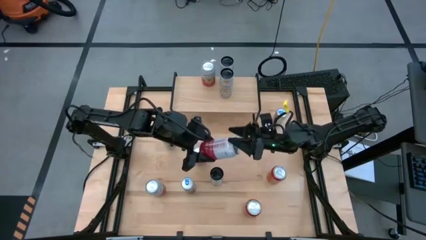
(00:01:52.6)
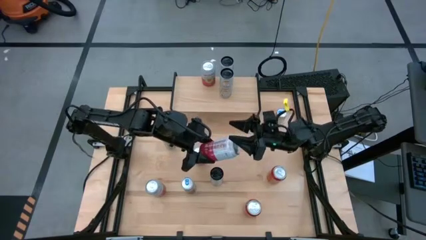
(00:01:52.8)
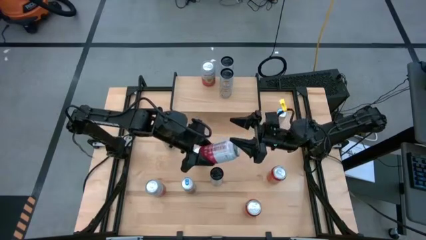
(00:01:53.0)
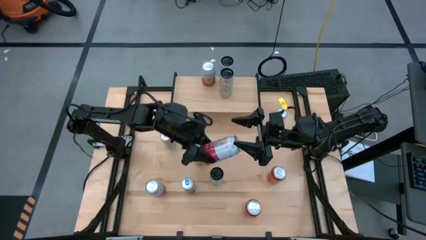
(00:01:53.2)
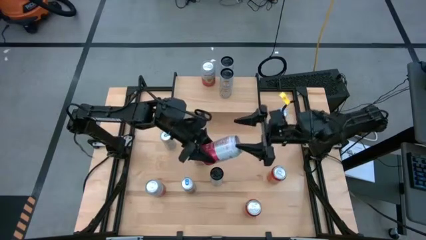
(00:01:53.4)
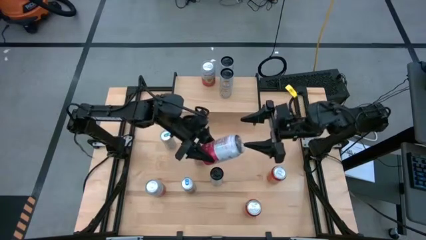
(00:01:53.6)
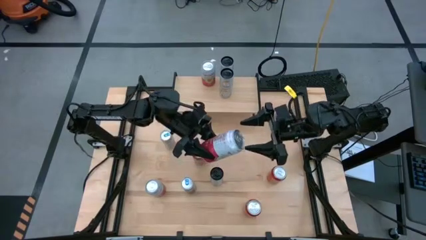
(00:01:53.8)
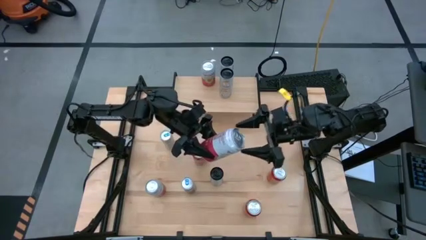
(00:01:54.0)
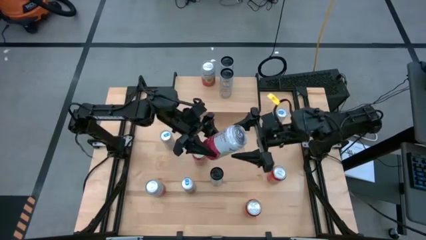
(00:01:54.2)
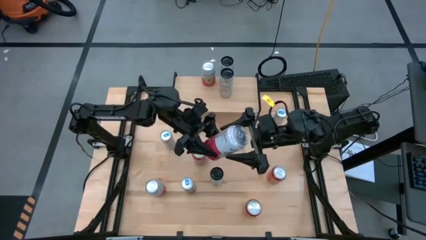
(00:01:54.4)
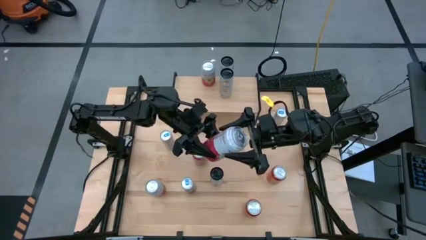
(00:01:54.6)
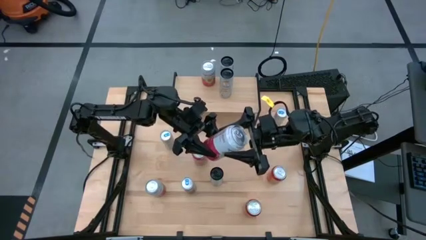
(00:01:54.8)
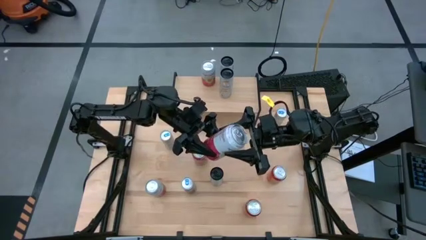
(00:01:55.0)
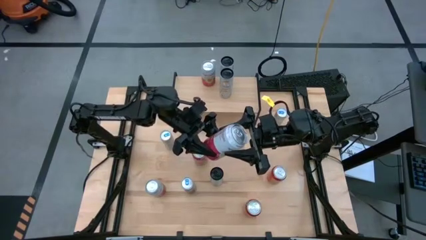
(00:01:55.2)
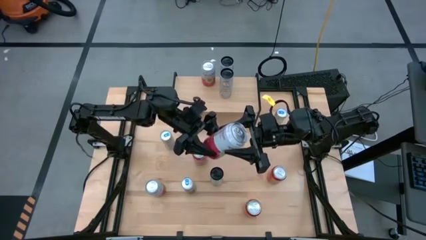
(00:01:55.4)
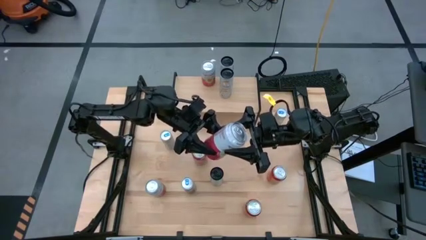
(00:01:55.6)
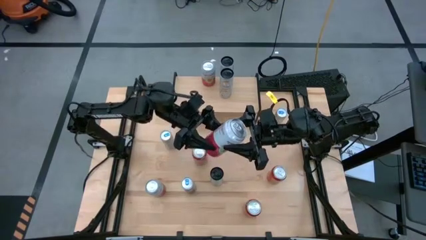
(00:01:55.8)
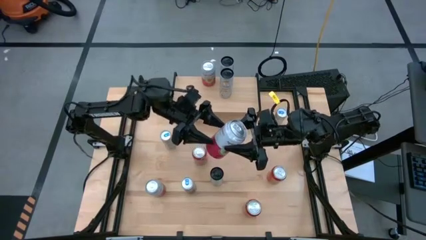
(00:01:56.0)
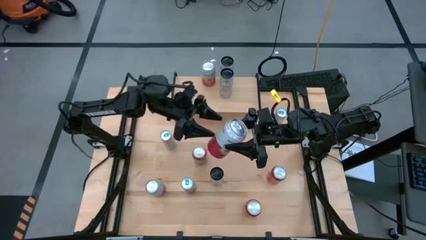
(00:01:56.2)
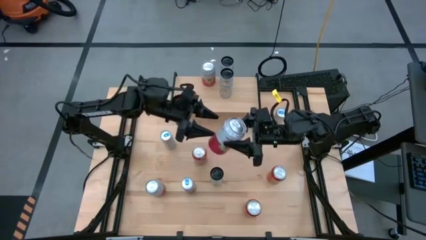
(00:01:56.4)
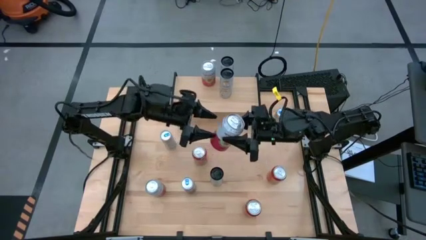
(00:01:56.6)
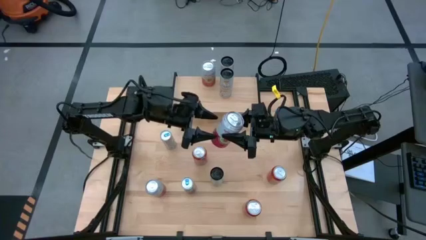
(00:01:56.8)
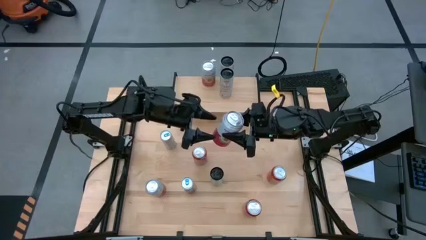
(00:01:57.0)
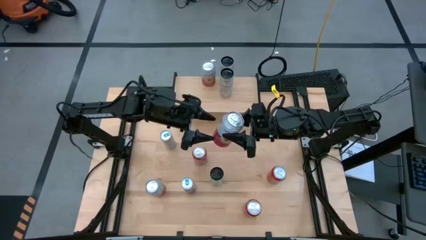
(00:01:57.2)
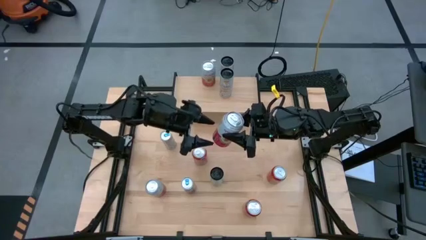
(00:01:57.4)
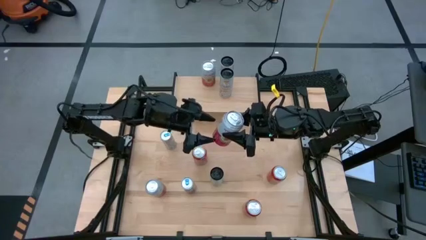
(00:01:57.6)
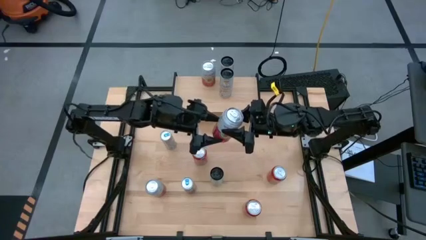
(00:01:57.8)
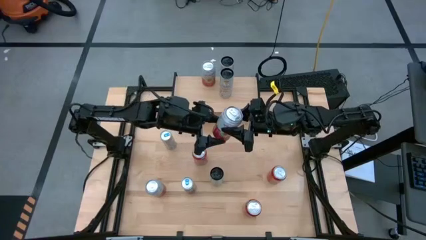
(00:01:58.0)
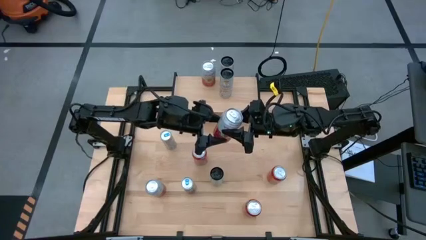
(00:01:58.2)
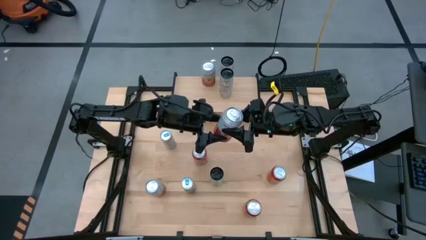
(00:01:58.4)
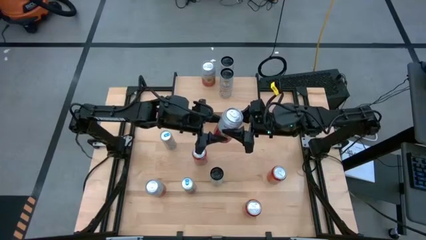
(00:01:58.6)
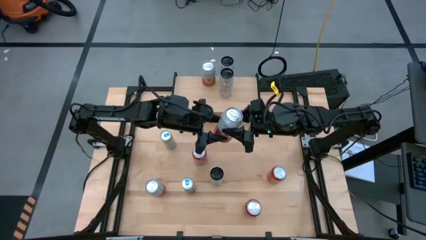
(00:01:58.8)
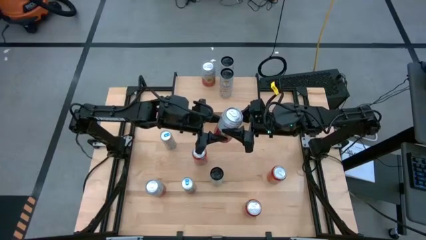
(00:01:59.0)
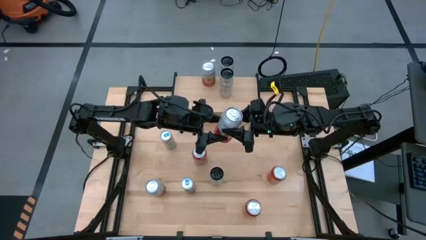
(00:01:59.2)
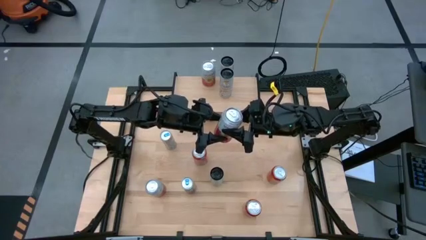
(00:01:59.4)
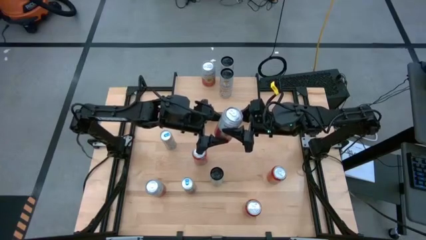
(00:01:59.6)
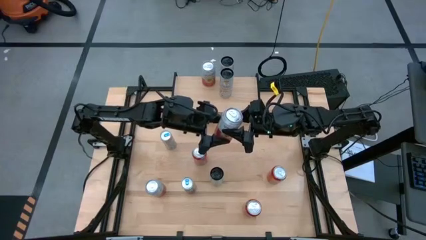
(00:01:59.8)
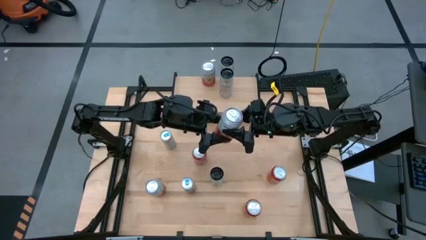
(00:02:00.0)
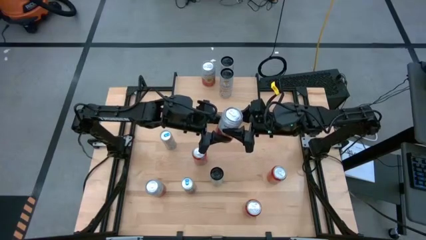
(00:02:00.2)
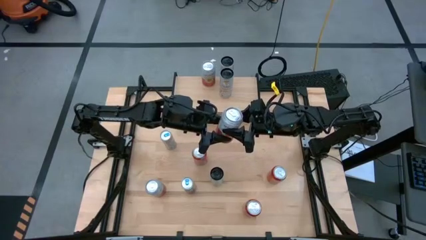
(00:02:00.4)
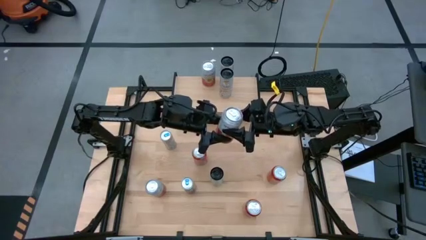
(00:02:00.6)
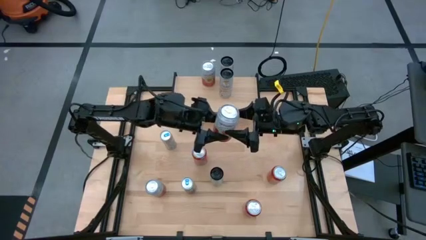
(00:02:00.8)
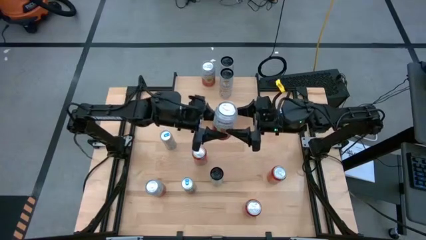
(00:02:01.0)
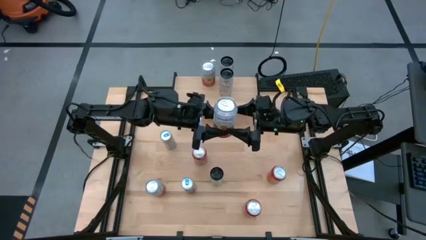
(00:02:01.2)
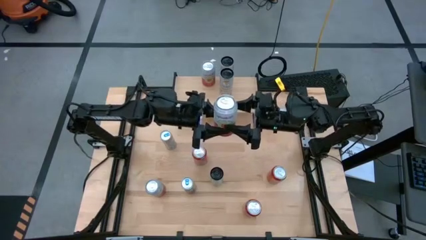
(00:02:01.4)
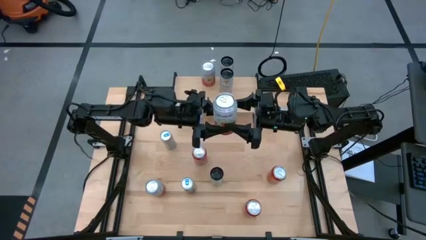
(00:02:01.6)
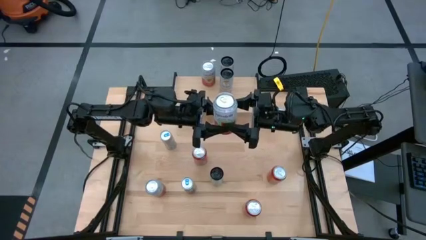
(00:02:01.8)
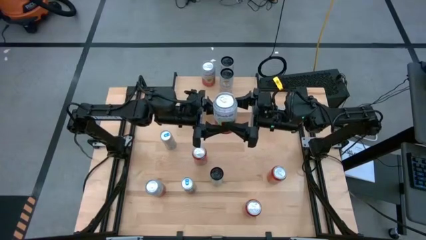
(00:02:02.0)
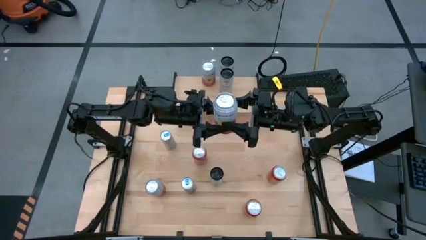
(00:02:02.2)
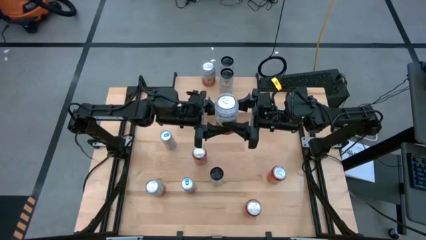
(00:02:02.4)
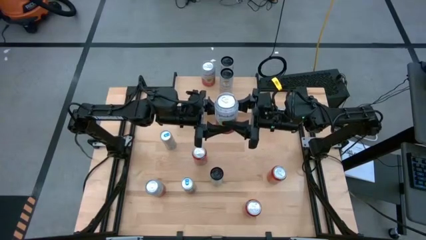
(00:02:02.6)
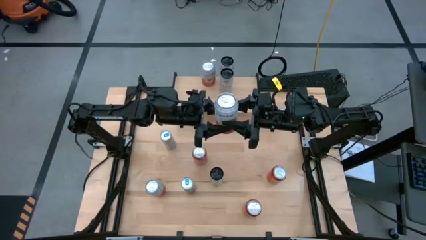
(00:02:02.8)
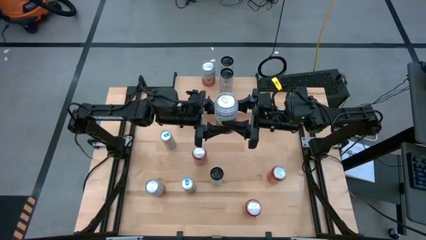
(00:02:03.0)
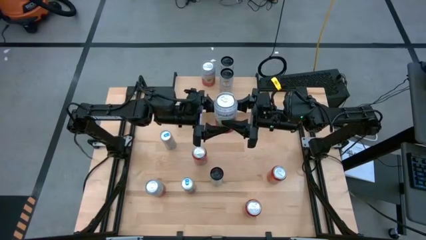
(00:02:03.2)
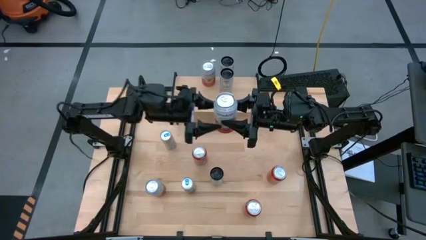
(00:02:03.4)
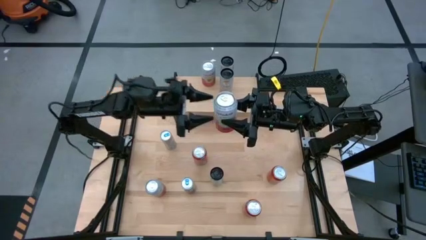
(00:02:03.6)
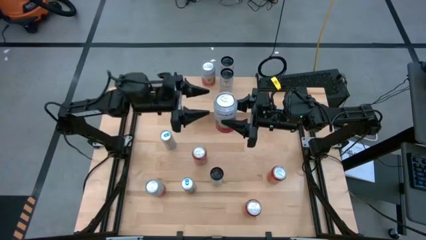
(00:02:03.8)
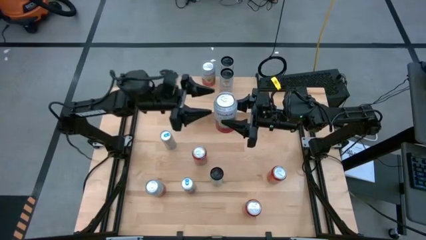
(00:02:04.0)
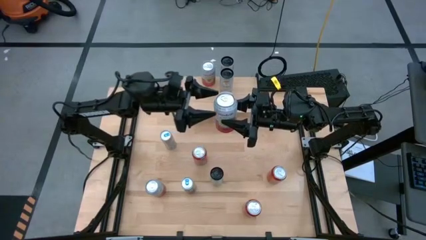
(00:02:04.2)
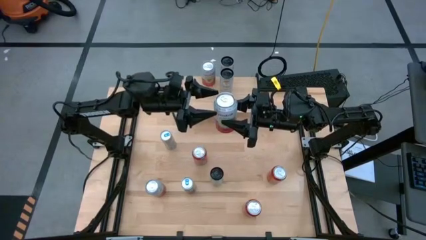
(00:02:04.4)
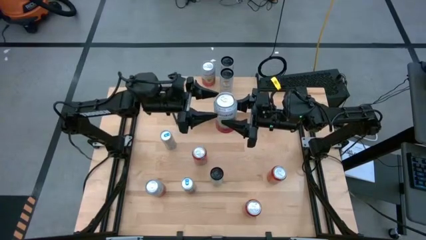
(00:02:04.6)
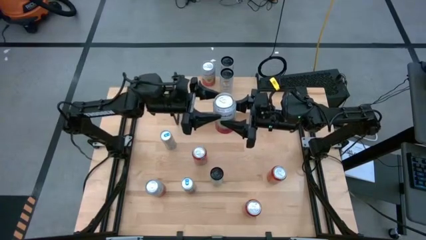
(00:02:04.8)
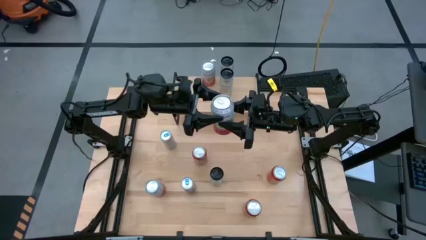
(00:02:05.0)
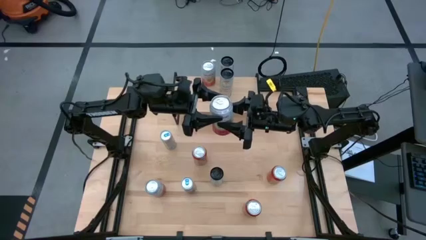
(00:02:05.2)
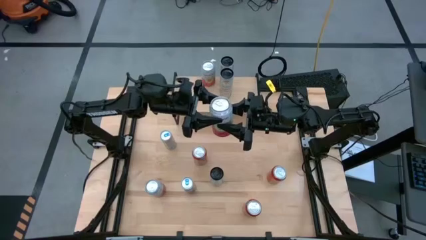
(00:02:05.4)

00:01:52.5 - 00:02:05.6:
Task: Place canned beverage on shelf
Put the right pink-white soda can aligned with the other pink-white on the shelf
